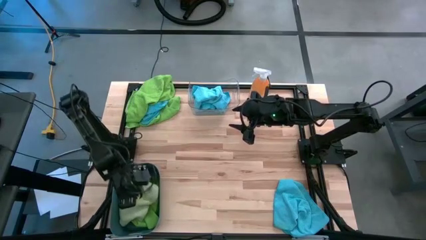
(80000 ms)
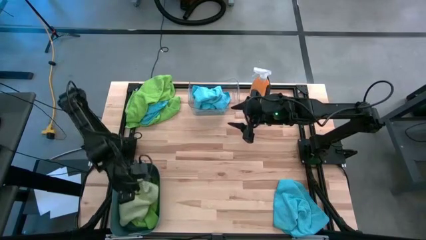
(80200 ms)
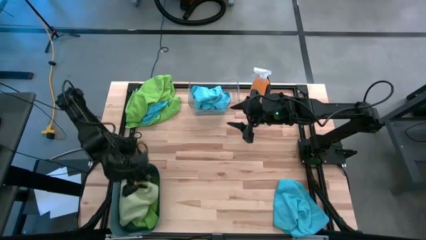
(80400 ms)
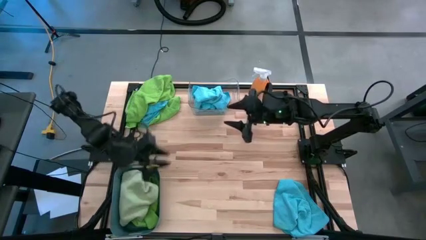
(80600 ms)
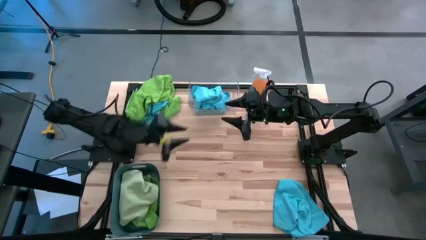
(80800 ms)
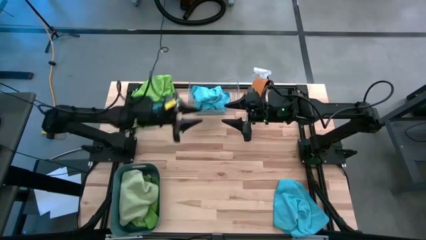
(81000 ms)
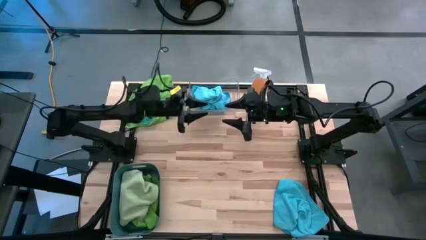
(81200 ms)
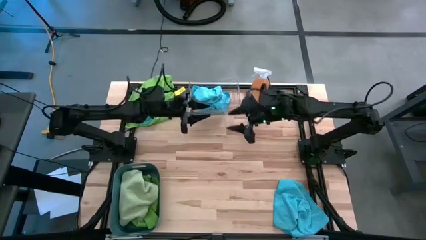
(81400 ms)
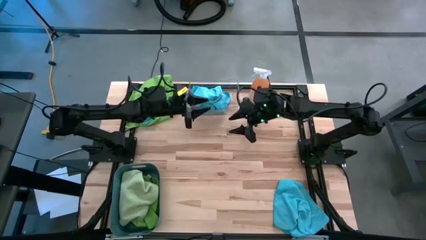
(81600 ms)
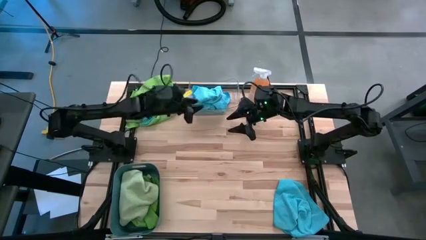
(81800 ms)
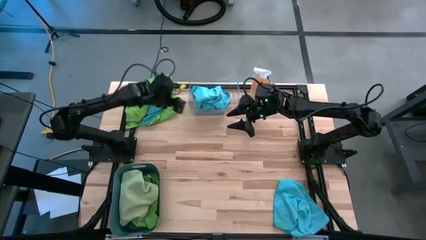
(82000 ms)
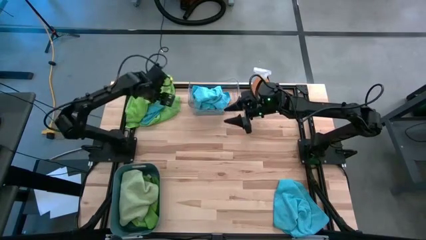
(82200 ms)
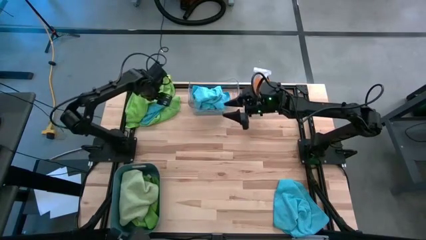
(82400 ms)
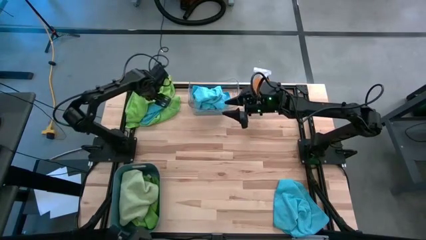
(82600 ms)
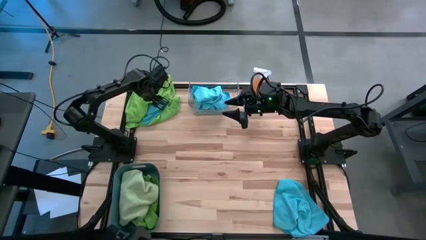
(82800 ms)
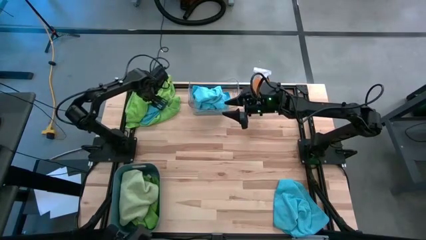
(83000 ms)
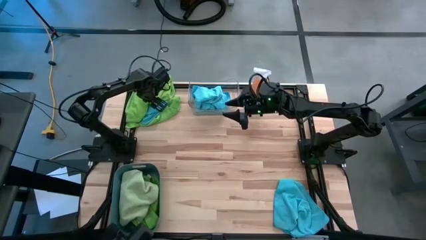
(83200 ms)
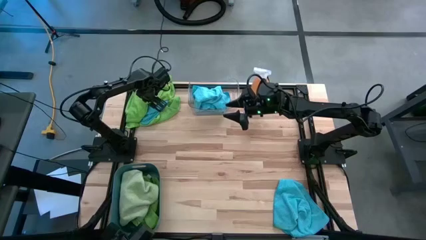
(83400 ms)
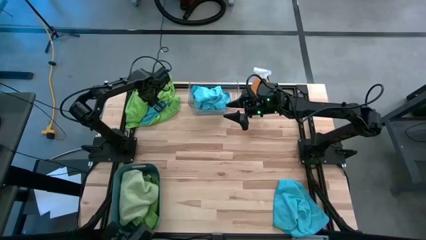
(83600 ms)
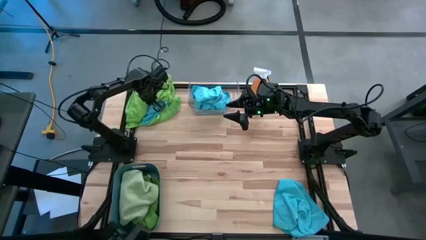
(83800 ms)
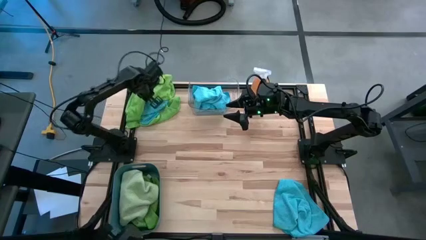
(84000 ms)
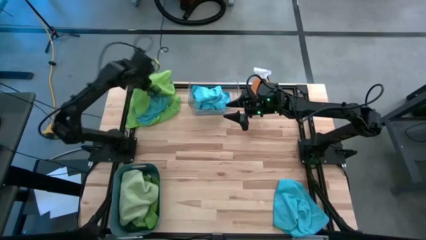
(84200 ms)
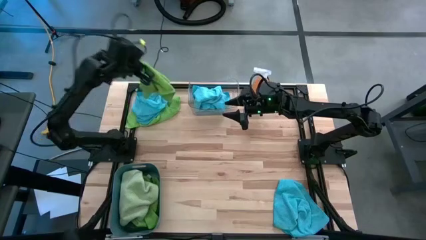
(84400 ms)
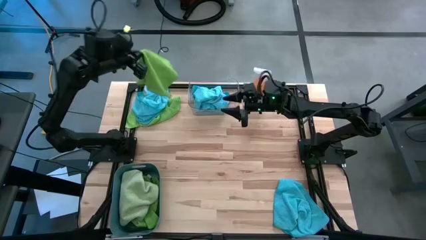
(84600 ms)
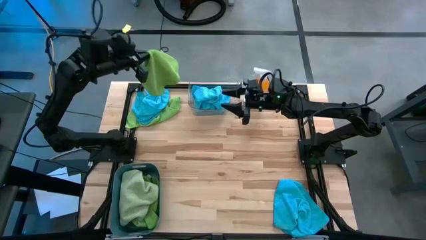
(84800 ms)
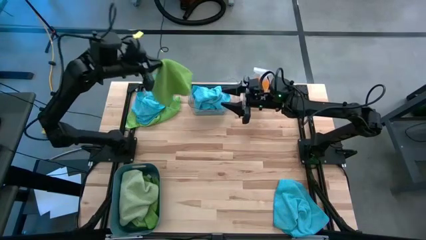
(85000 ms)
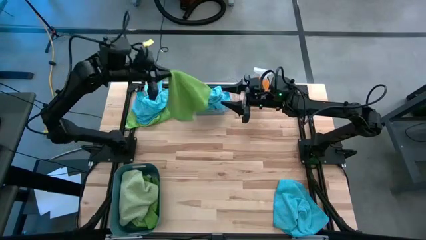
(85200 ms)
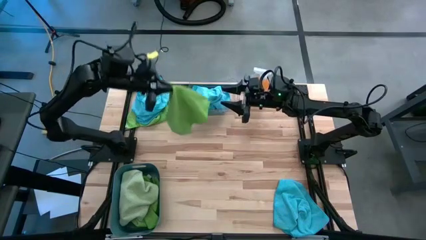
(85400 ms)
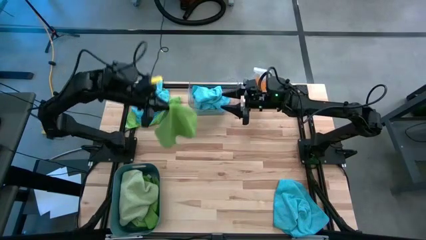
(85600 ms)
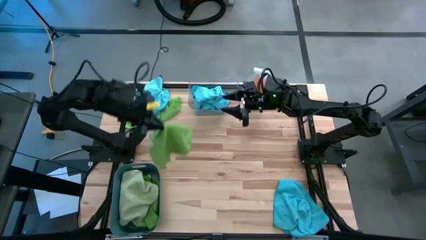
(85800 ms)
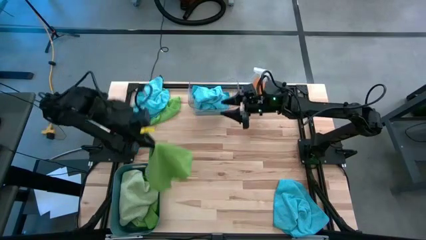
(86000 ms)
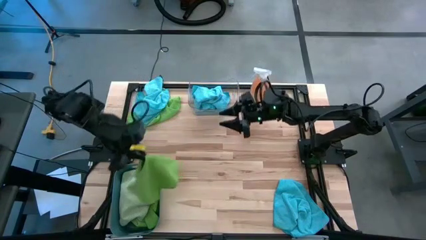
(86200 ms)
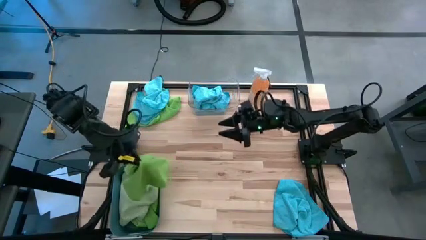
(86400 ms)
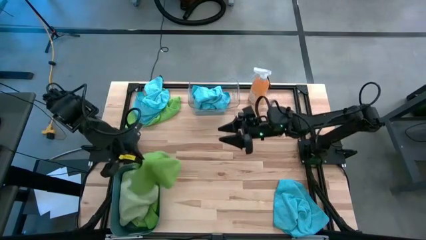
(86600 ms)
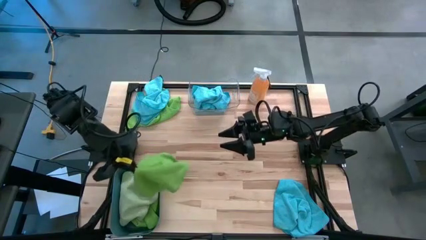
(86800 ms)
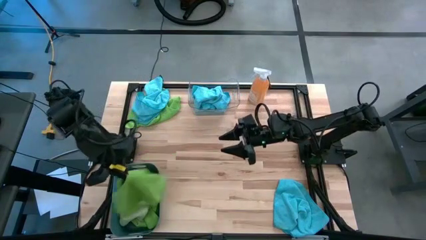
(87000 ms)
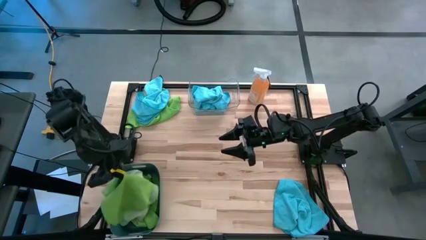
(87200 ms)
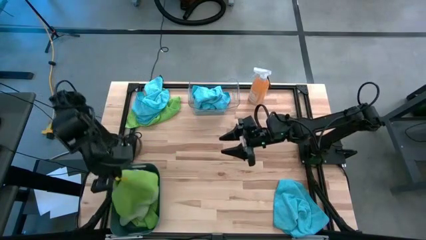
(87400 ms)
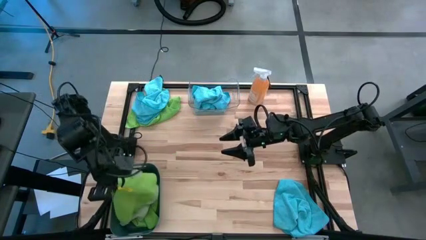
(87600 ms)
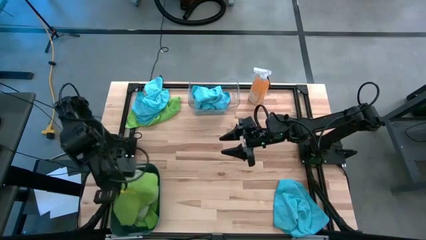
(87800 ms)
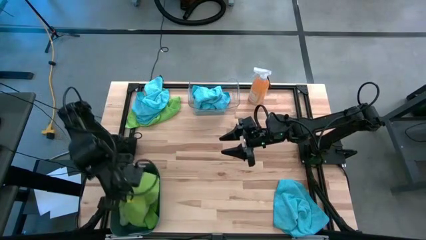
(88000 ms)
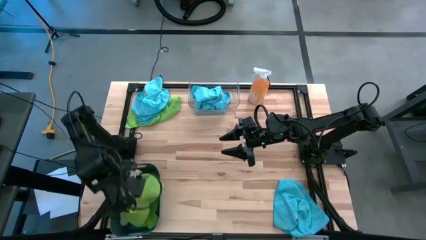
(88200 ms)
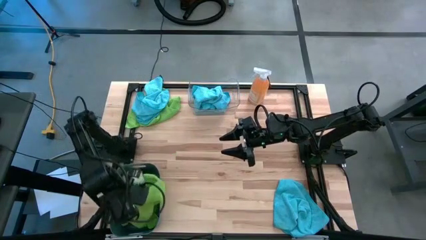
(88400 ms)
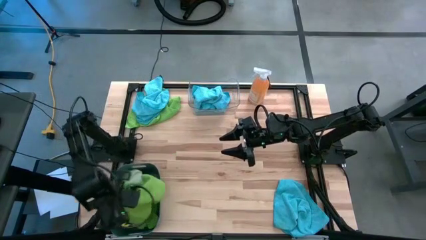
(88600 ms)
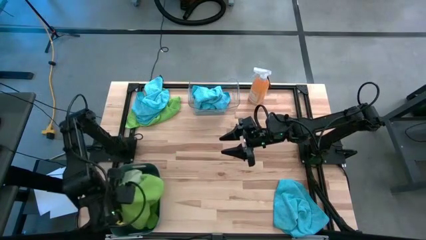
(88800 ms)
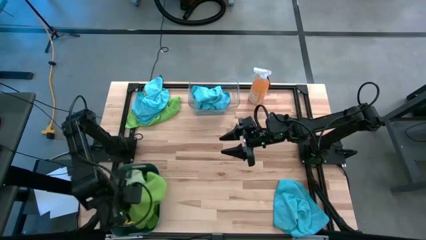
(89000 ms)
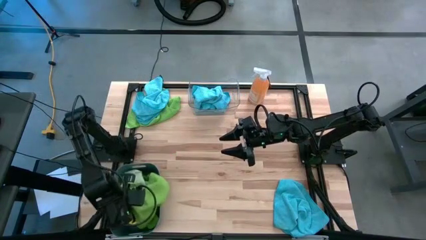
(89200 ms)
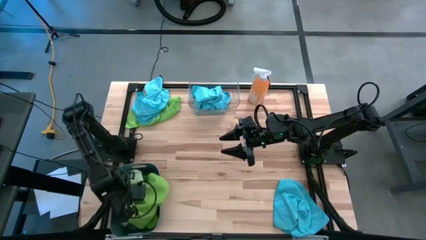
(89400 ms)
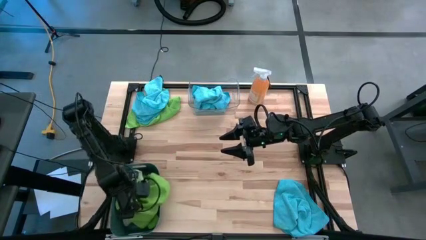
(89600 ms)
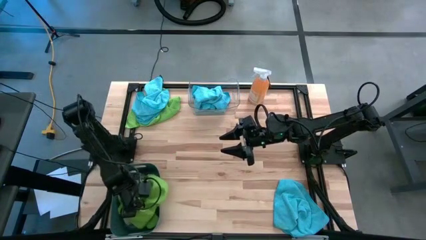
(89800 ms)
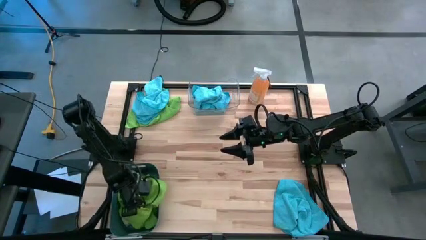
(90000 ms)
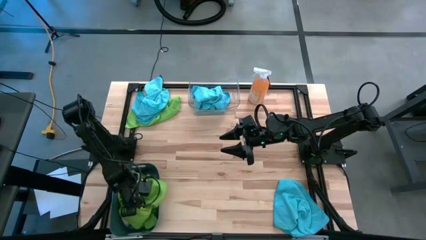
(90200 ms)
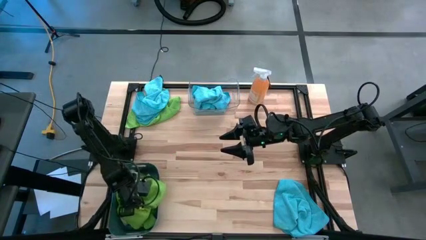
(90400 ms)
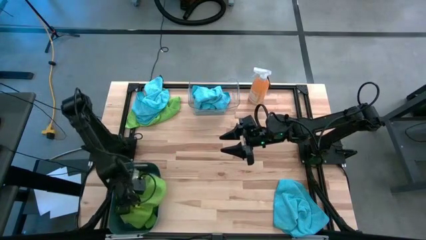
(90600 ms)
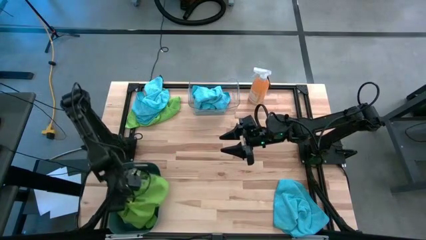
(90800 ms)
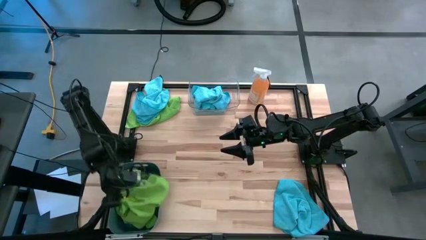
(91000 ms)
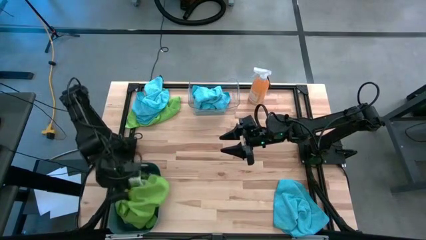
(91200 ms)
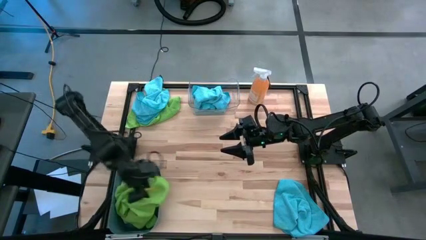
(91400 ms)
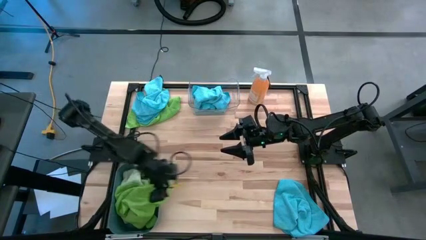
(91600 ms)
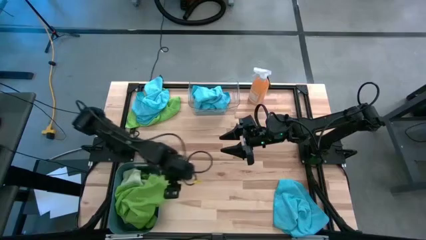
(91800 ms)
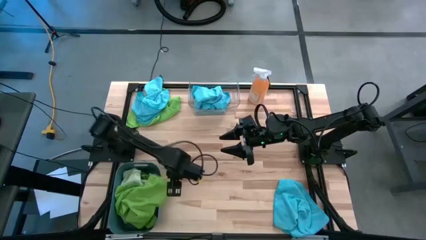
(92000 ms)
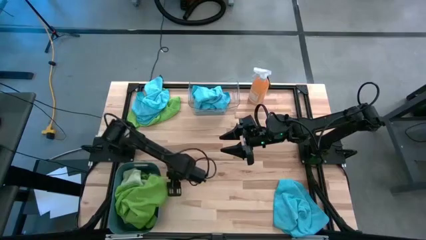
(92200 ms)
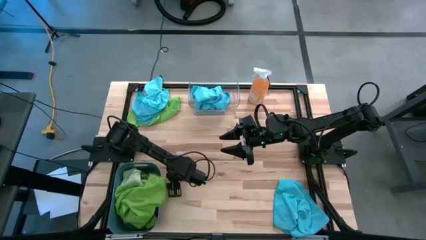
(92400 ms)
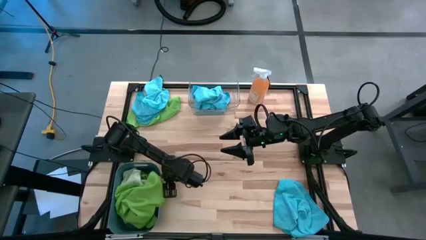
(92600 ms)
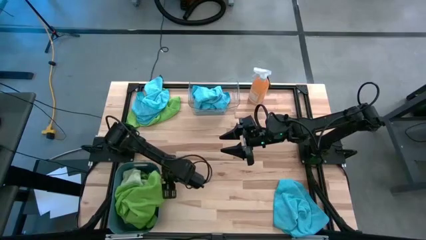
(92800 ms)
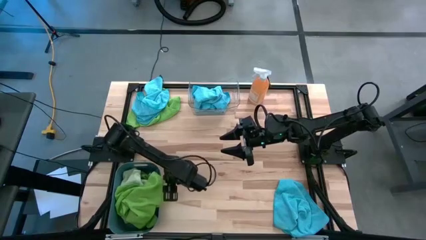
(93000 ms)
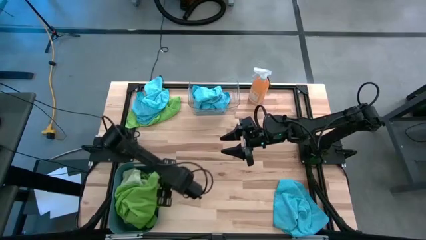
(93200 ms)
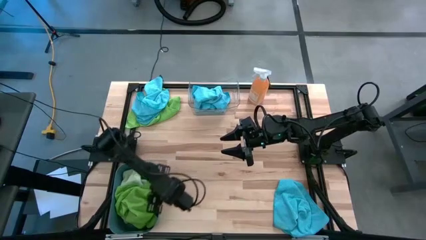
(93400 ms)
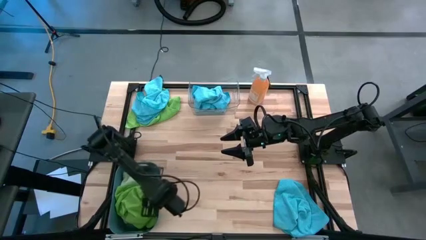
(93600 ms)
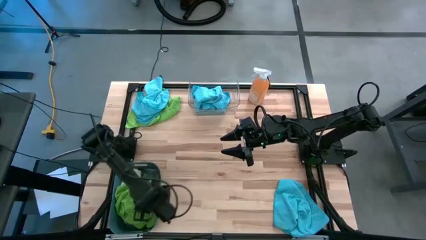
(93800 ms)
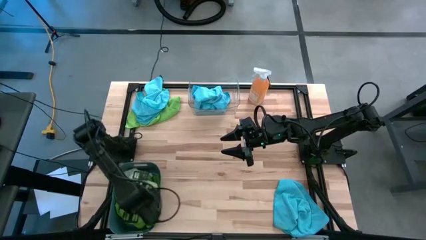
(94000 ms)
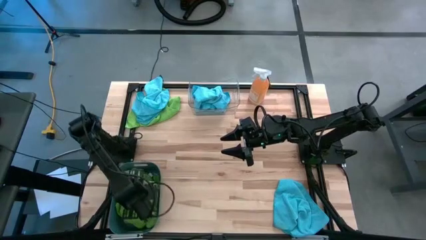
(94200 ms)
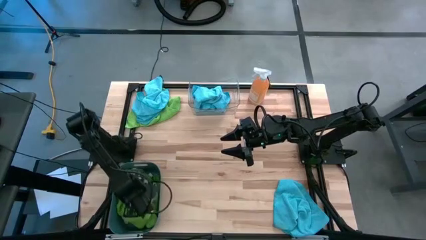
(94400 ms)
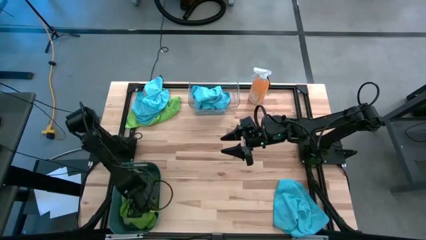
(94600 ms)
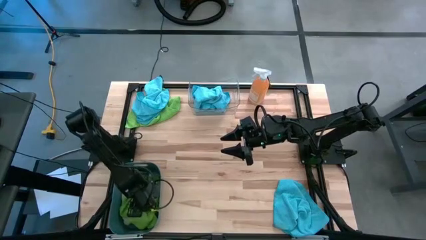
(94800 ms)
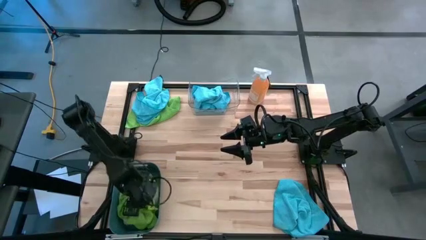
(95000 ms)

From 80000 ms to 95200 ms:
Task: Sort microfiber towel by color & place in baskets
Put the green microfiber towel into the blue bin

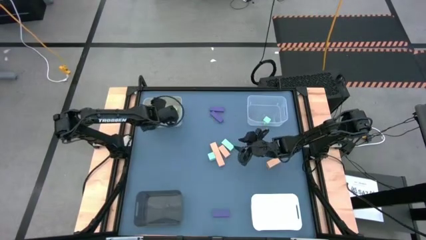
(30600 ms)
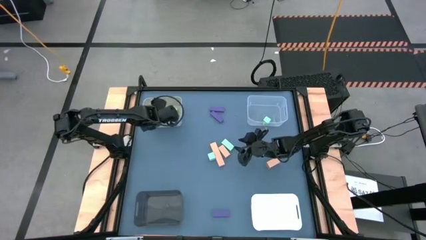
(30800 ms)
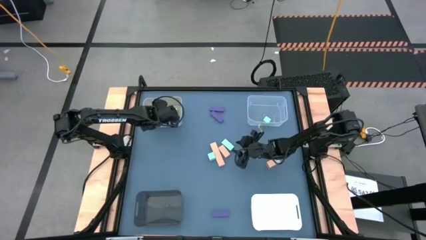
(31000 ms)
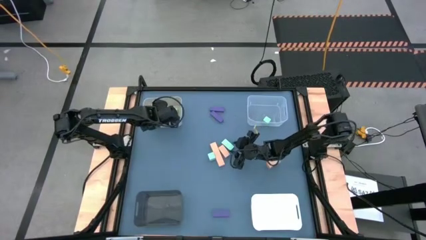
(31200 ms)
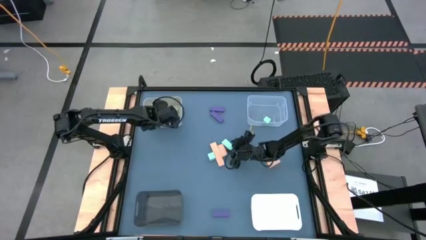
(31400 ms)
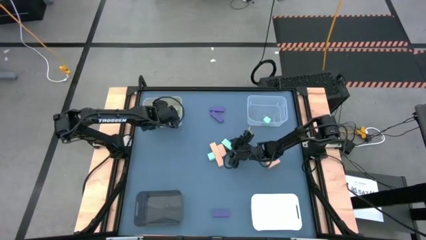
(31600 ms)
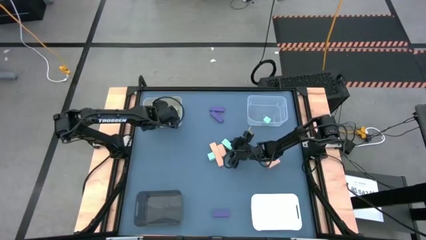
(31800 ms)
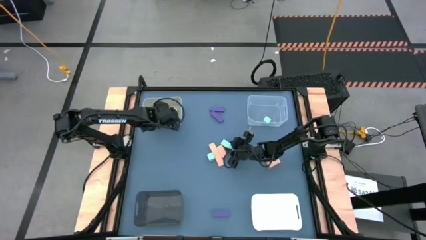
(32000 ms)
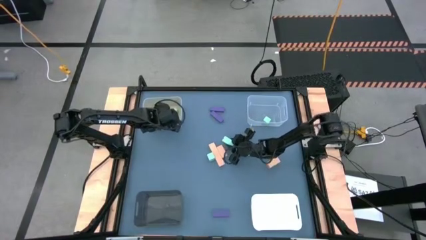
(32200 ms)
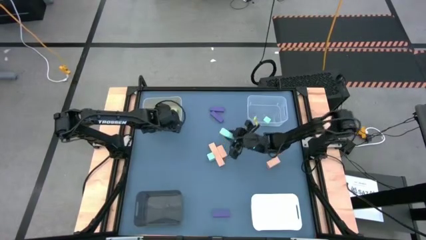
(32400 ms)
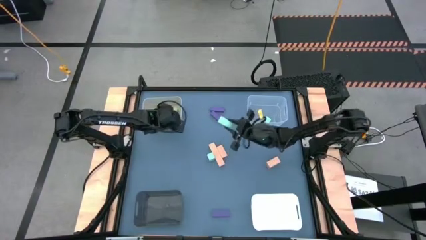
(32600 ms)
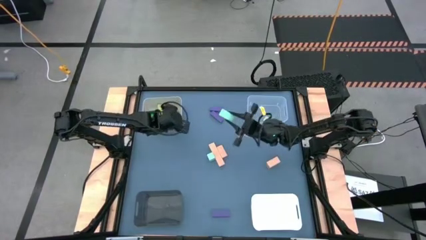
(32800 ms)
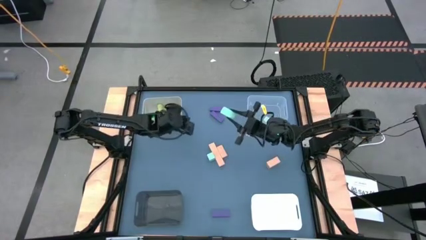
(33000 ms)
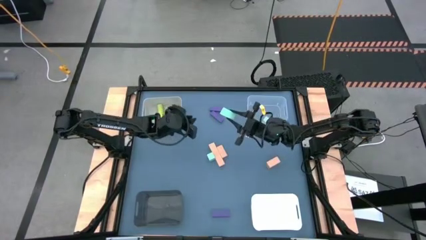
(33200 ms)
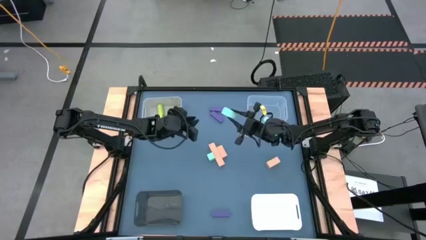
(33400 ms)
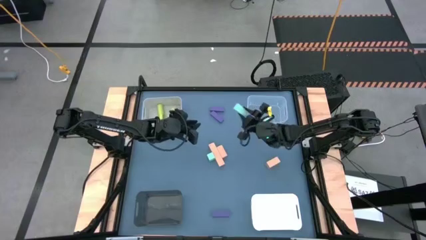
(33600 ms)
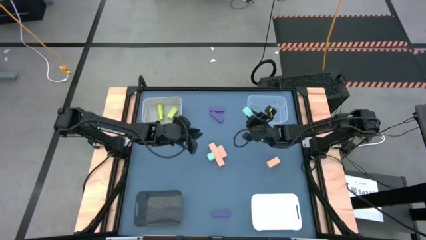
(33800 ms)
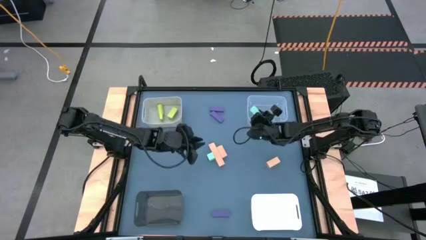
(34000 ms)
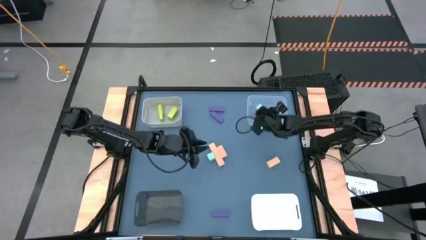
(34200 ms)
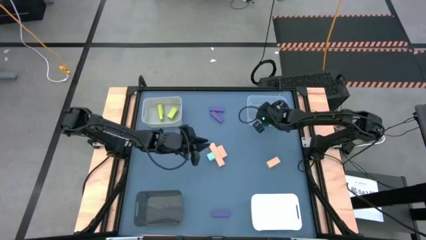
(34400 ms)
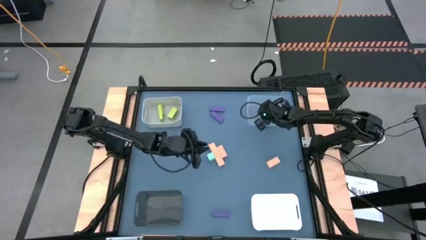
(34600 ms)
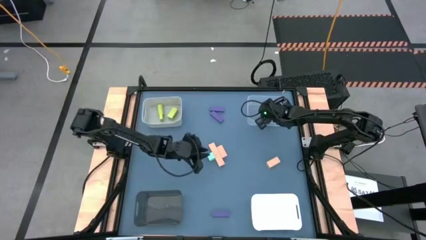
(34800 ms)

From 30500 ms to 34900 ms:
Task: Sort & place blocks by color
Put the blue block into the transparent bin
